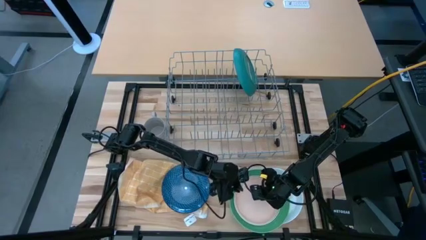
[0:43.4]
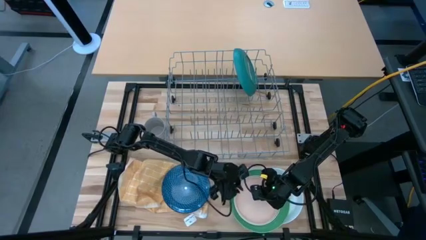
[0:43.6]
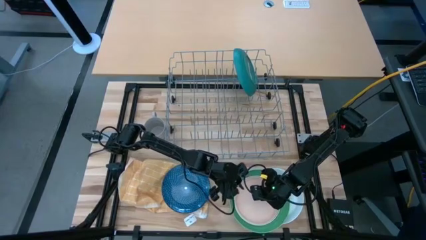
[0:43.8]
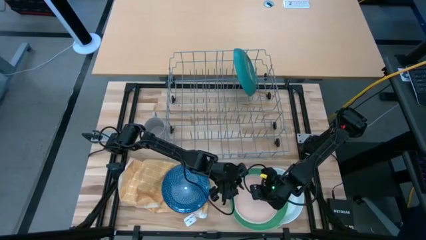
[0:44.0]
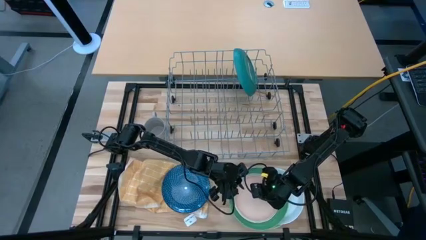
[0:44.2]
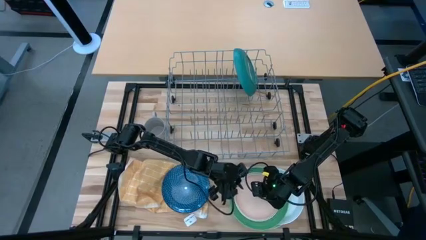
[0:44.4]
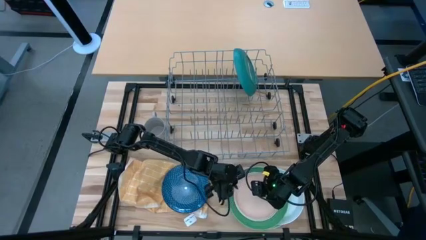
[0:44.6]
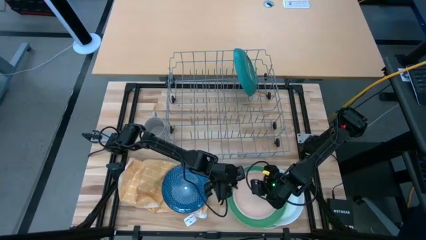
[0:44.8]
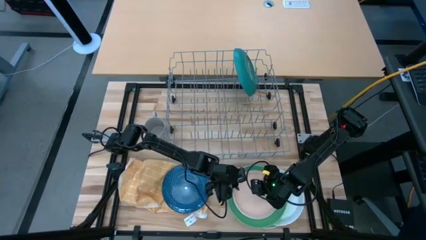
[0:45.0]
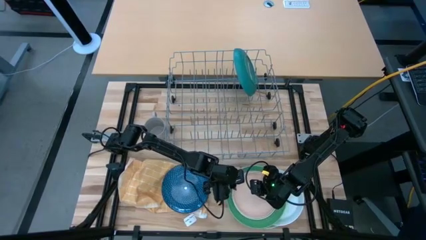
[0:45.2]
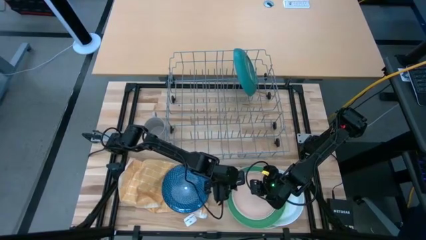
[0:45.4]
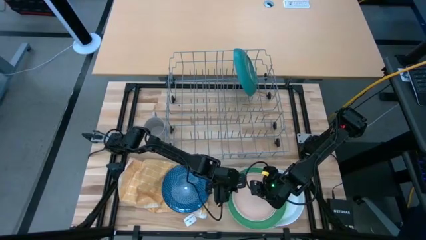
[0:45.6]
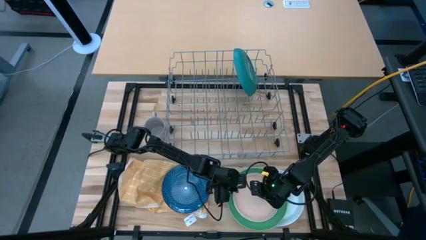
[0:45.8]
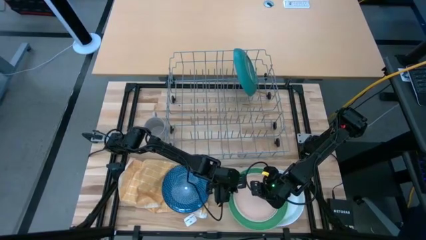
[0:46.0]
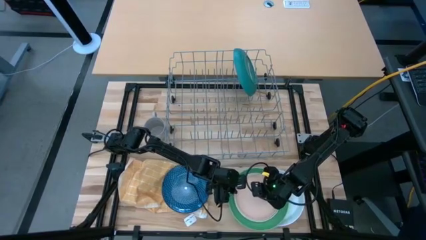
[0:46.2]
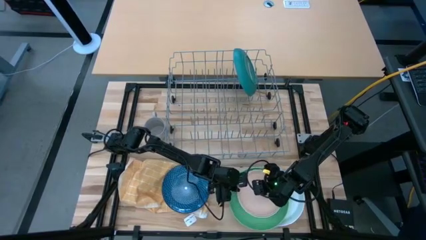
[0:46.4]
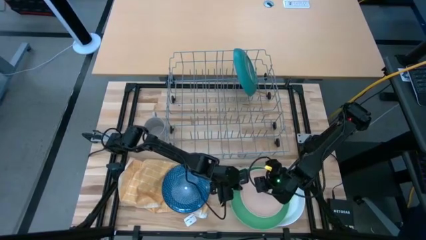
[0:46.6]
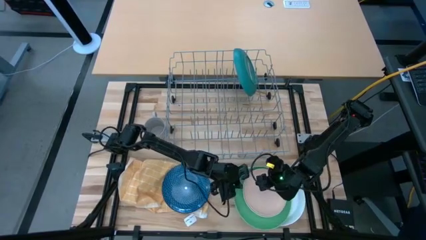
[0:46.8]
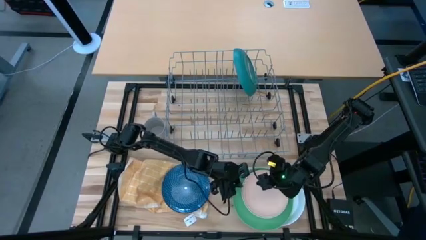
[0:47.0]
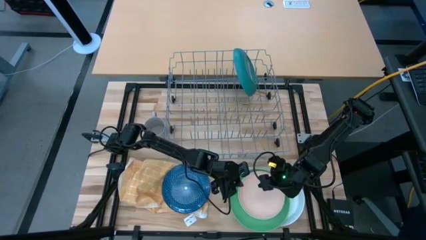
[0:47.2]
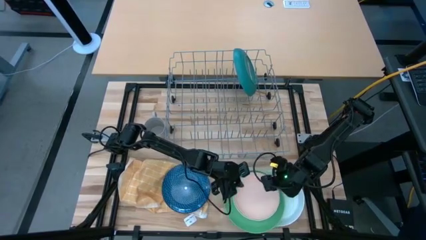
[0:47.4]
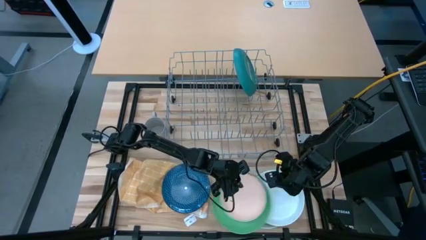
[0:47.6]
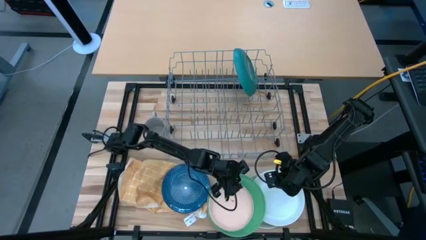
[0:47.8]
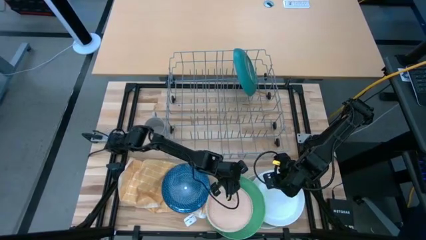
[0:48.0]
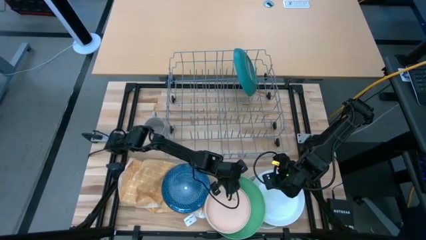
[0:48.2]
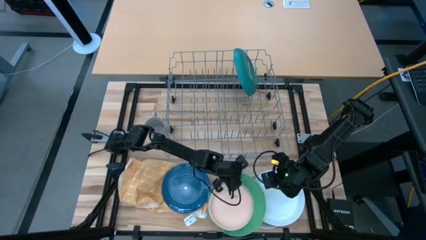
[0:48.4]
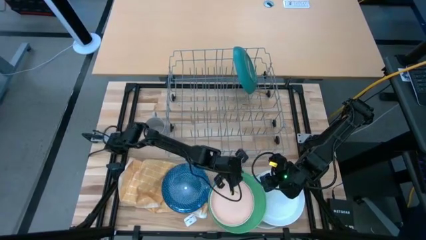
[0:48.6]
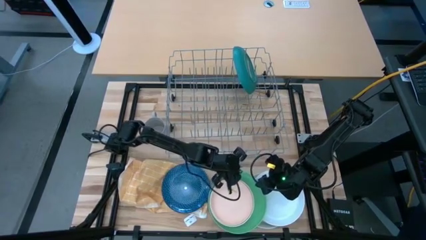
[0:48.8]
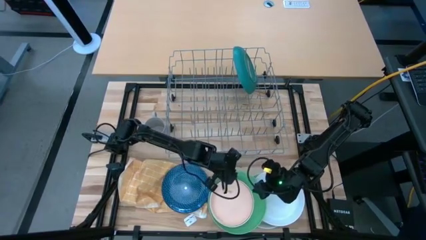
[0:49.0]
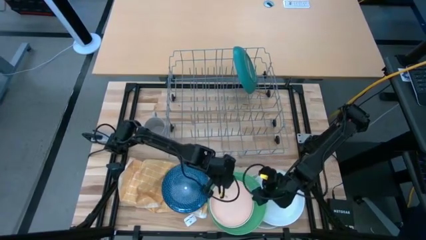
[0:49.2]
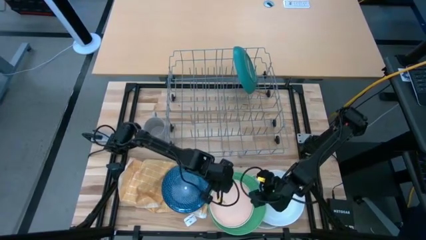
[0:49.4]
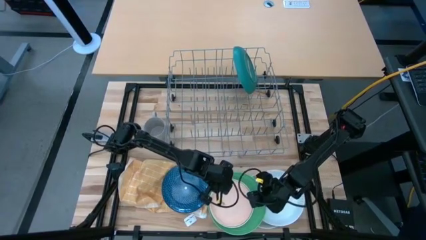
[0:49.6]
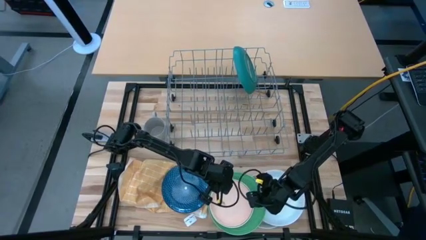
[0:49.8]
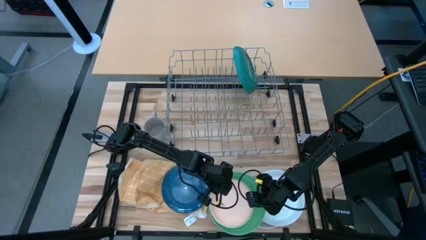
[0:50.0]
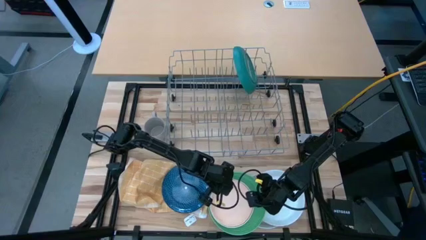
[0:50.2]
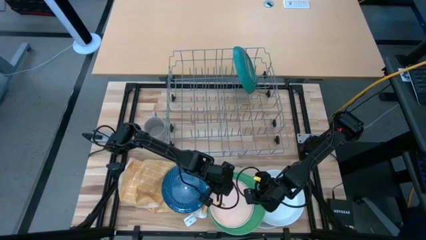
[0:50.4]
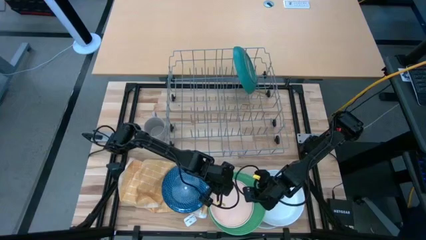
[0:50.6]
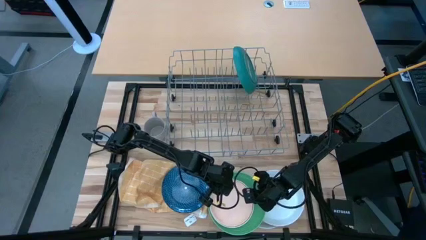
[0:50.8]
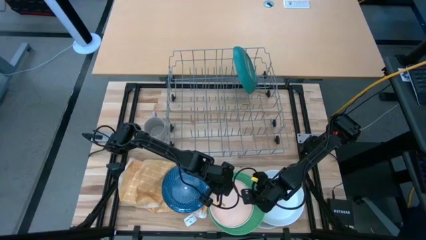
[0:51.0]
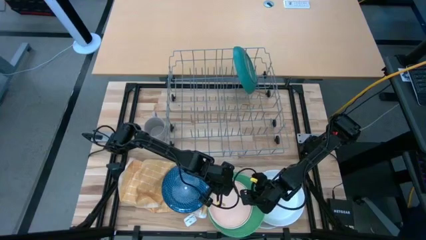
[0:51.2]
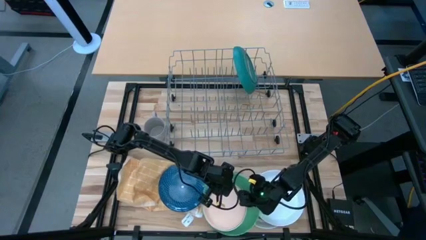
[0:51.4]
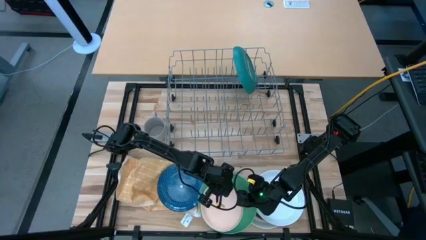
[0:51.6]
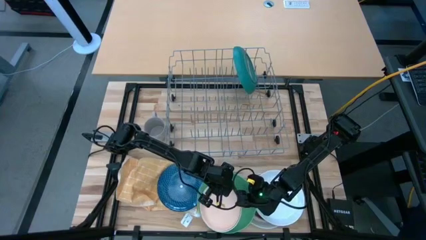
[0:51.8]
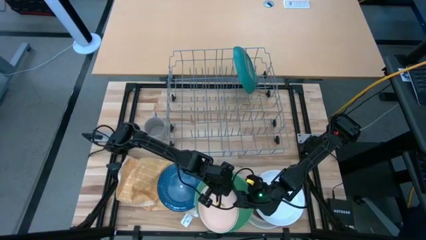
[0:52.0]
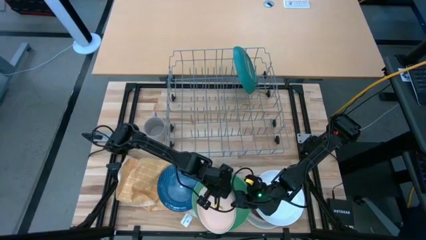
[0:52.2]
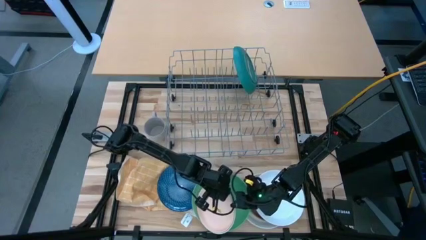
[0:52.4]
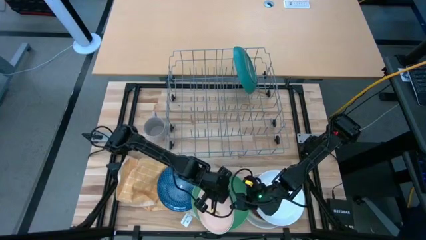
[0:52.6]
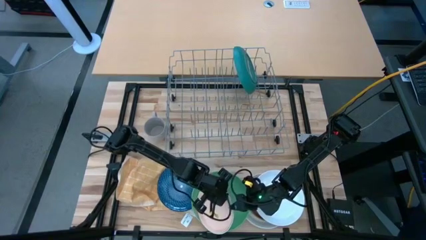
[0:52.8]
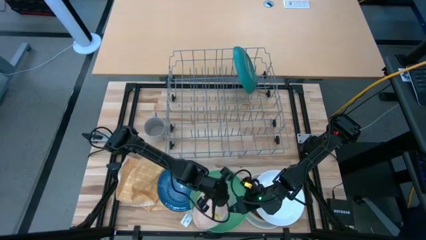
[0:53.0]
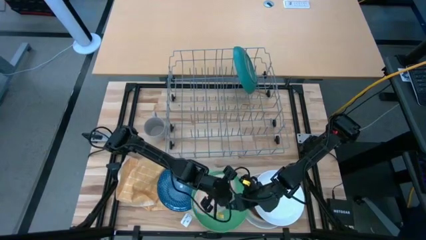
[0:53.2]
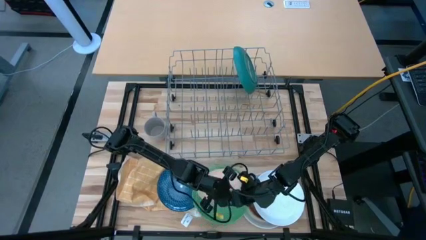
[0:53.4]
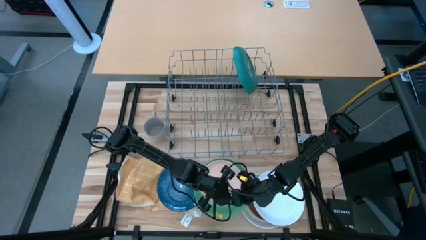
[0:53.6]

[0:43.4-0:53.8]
Task: Sort dishes
Move the stacked plates to the bottom left of the table

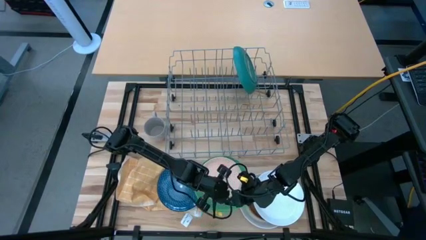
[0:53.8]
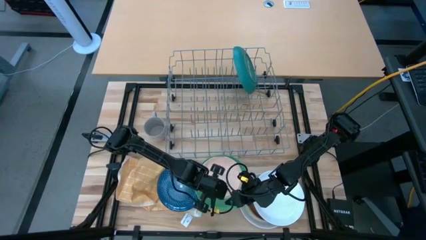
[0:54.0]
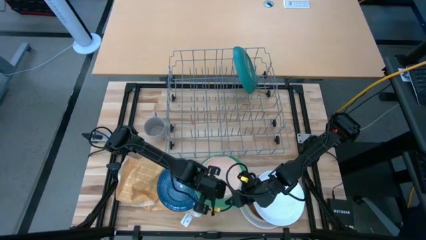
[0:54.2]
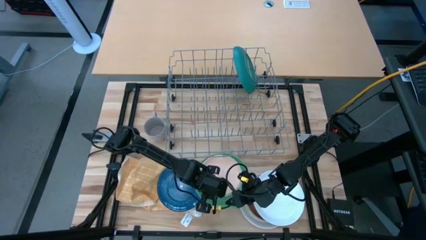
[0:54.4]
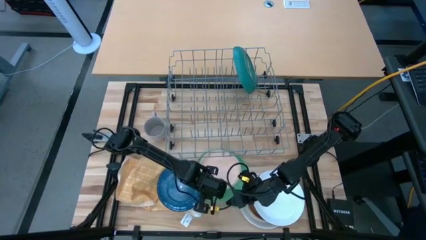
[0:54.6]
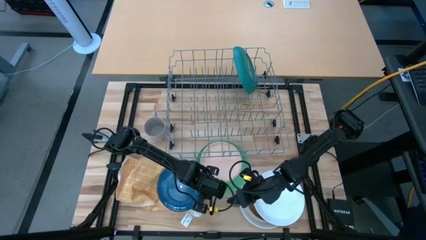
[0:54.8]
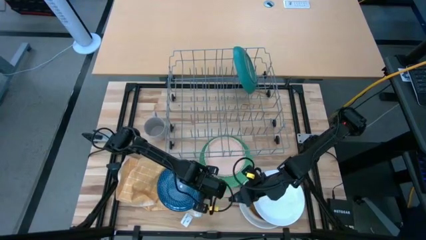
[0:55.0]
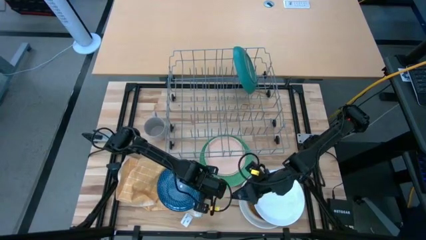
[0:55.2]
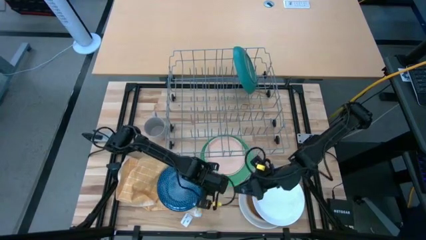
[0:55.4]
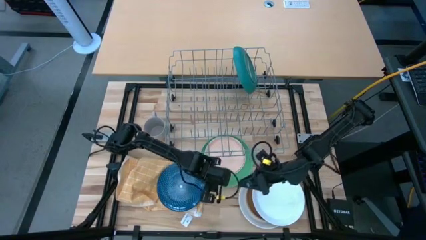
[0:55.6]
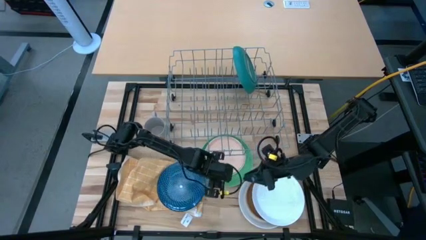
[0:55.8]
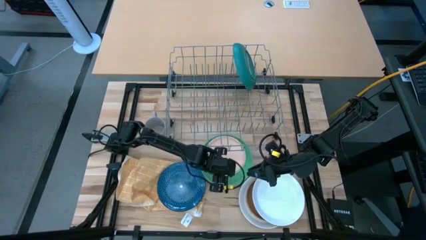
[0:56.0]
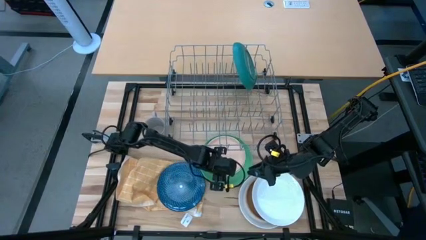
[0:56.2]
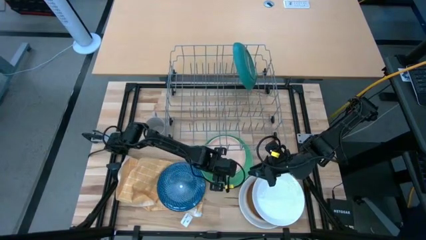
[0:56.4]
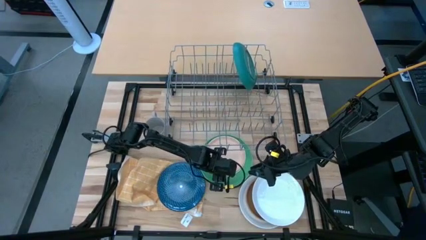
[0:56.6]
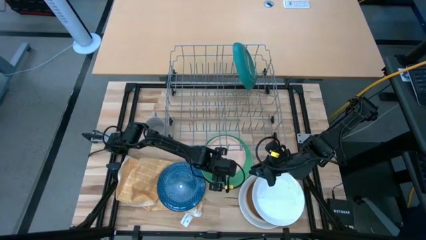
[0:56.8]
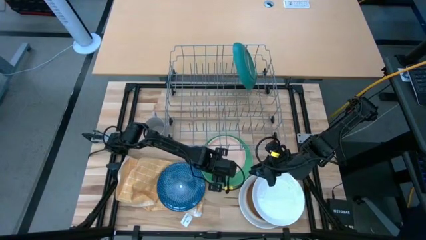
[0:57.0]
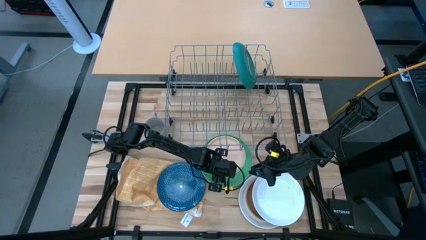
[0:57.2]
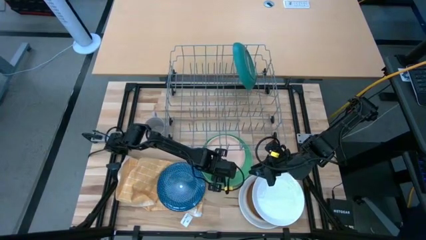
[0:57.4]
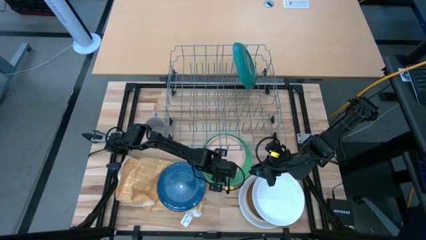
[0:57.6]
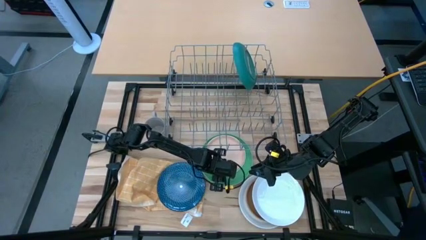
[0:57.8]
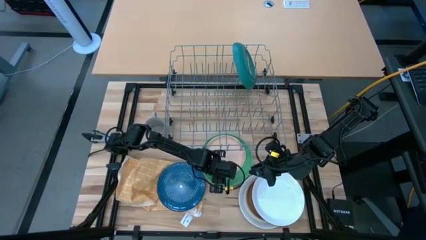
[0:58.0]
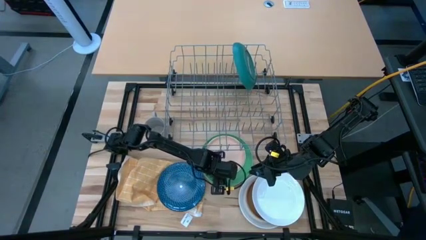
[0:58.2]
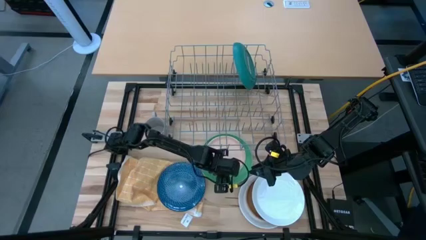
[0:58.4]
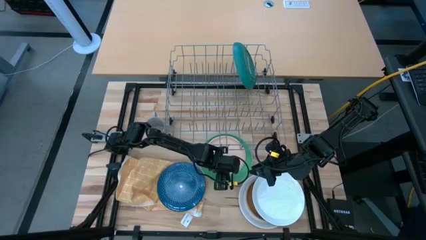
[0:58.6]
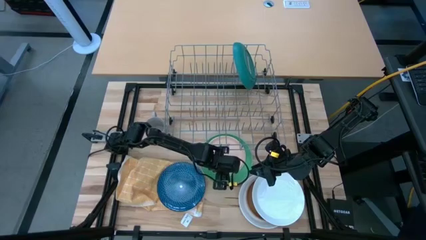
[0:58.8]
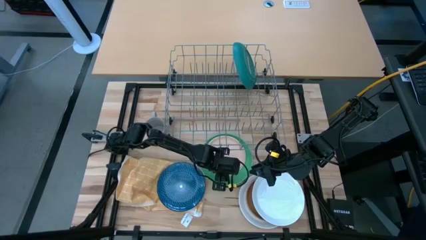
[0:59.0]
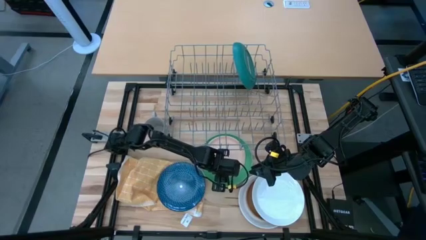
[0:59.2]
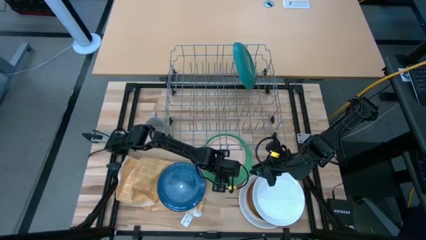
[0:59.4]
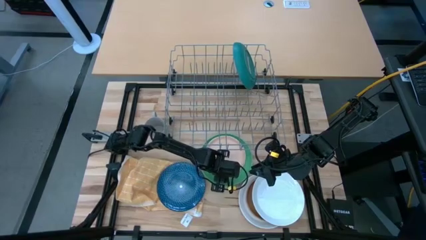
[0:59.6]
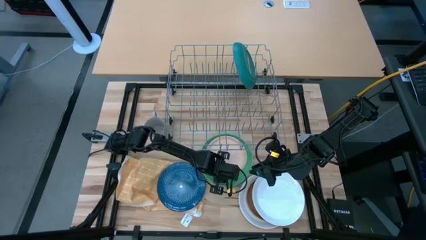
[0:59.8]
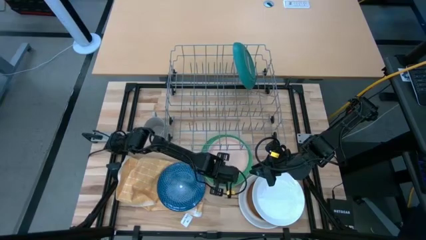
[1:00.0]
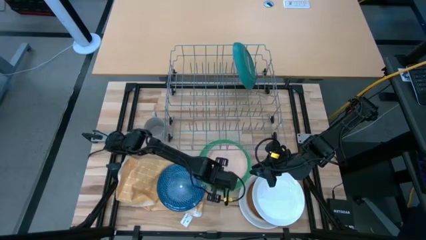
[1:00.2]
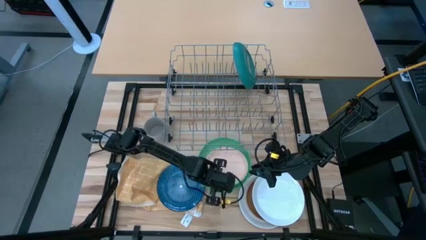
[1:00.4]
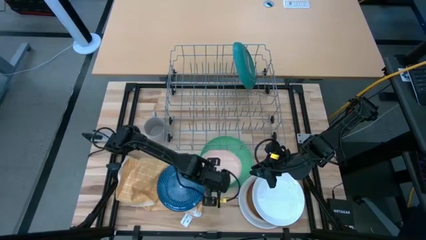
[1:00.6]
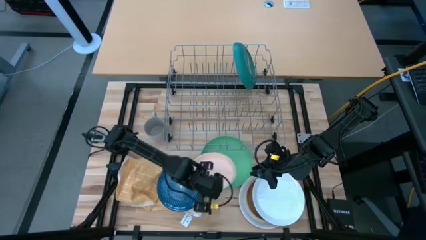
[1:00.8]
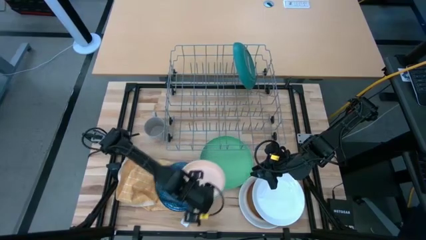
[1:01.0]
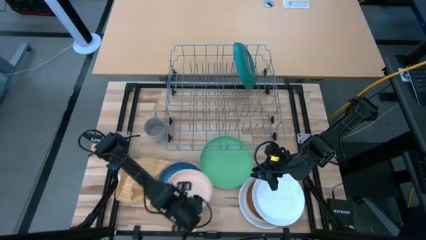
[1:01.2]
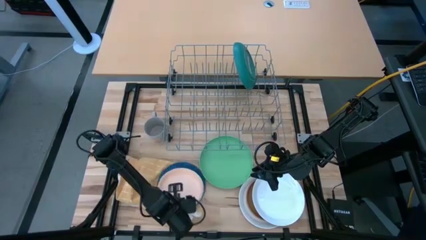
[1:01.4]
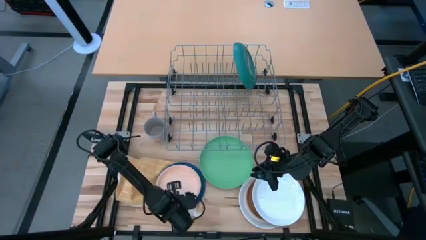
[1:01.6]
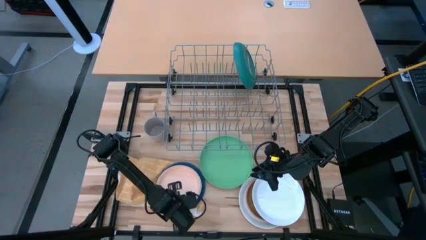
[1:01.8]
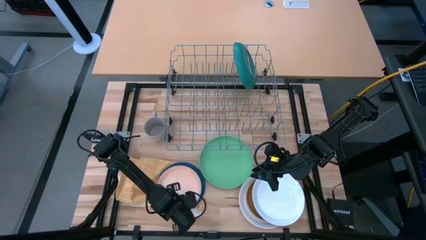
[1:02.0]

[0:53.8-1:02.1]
Move the stacked plates to the bottom left of the table
